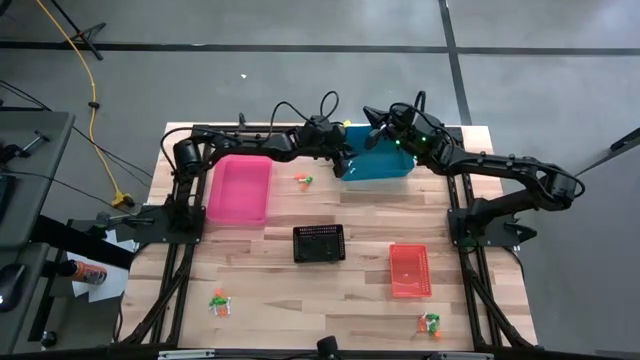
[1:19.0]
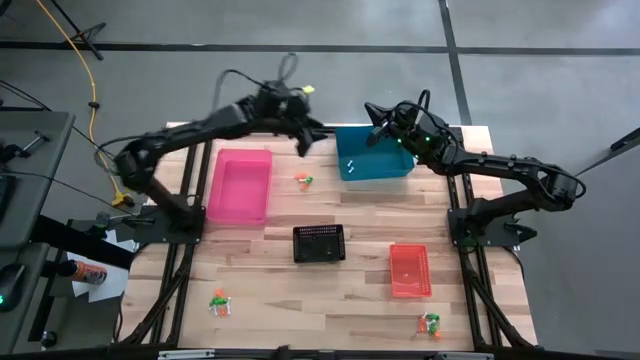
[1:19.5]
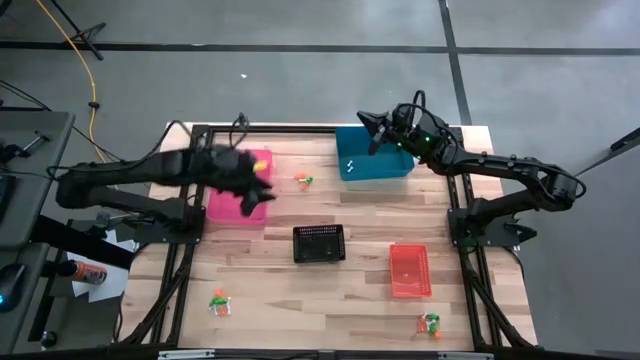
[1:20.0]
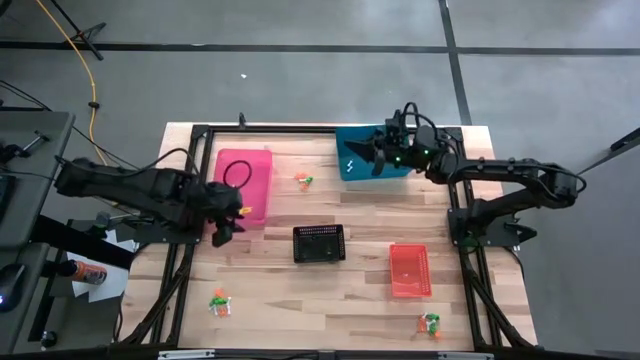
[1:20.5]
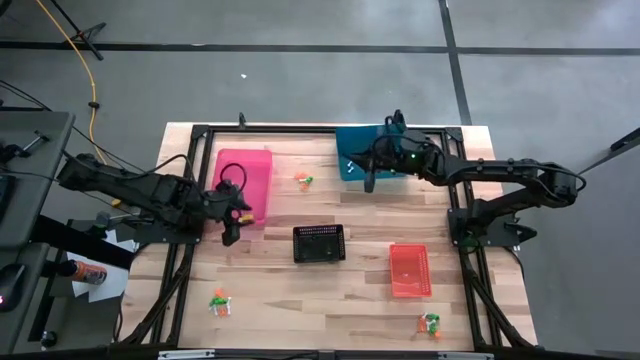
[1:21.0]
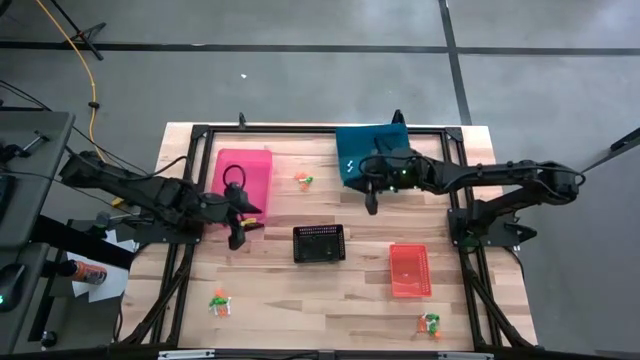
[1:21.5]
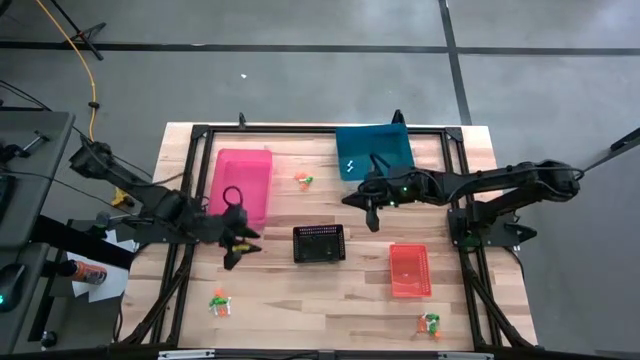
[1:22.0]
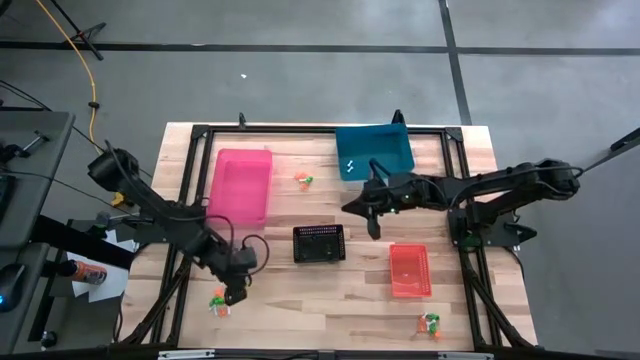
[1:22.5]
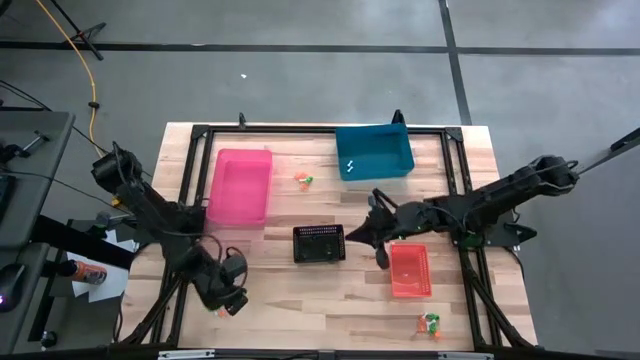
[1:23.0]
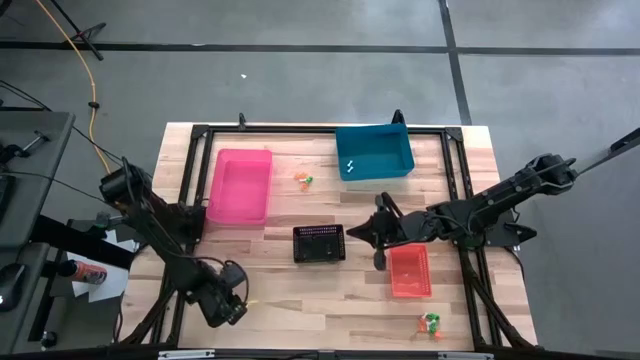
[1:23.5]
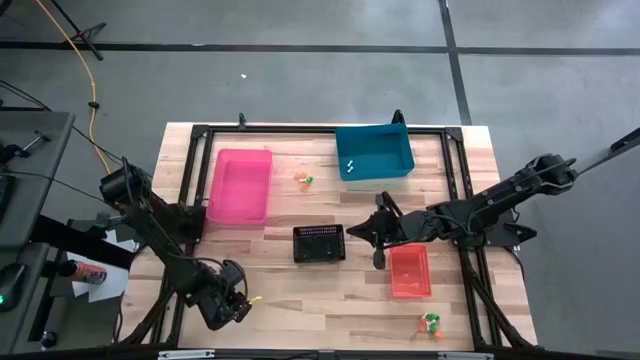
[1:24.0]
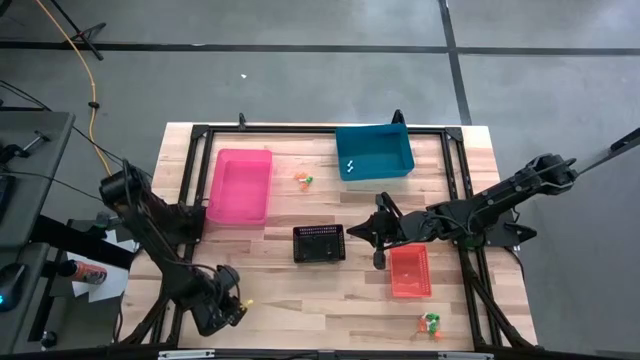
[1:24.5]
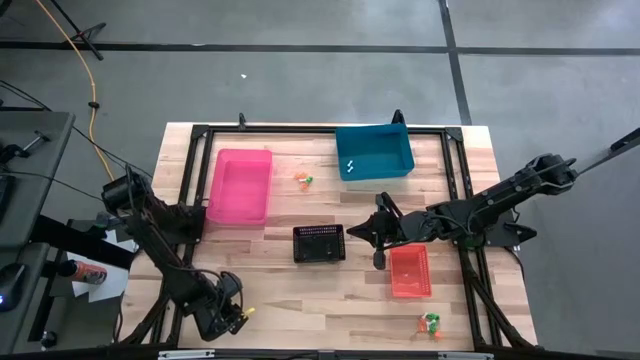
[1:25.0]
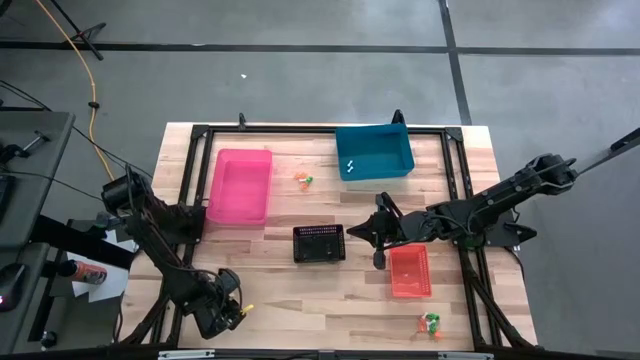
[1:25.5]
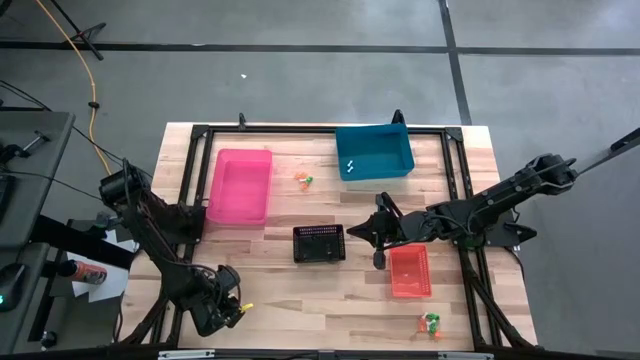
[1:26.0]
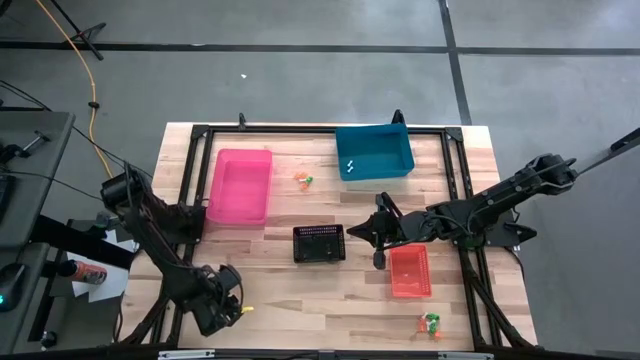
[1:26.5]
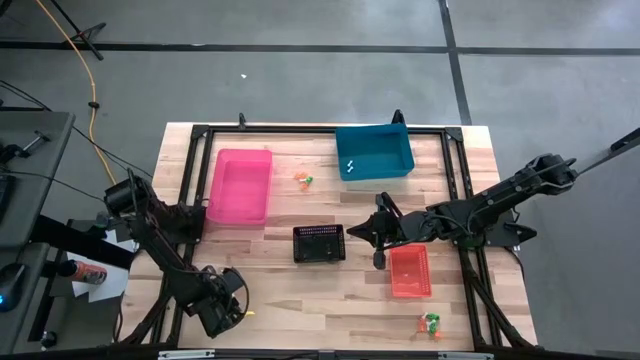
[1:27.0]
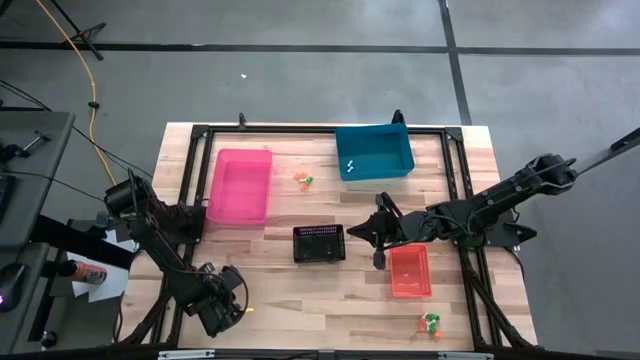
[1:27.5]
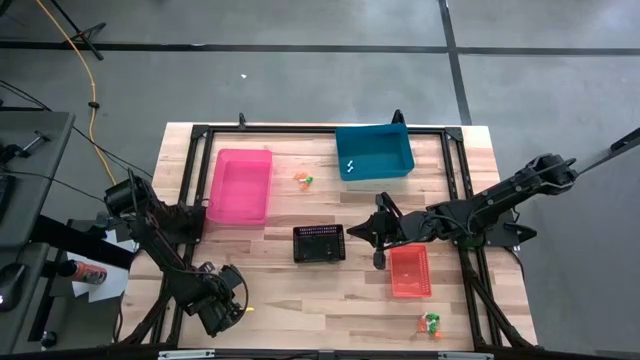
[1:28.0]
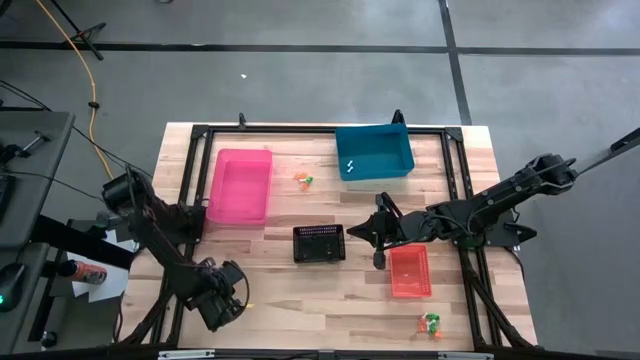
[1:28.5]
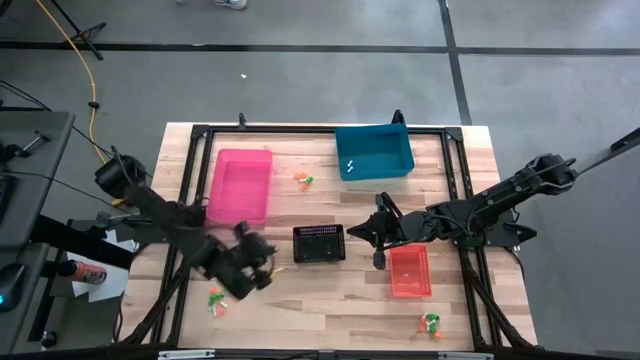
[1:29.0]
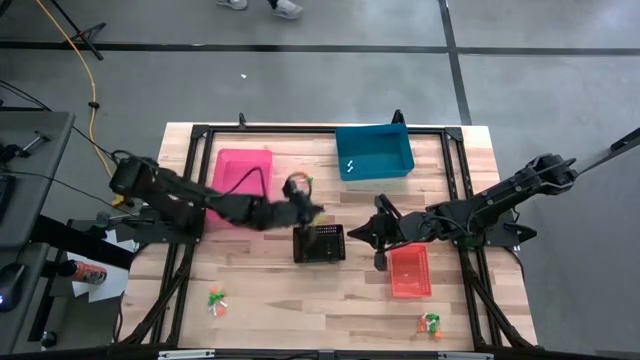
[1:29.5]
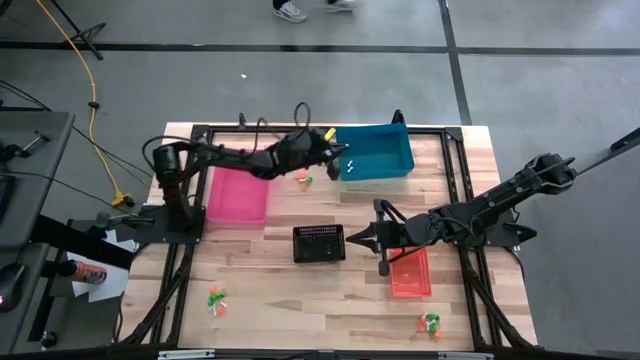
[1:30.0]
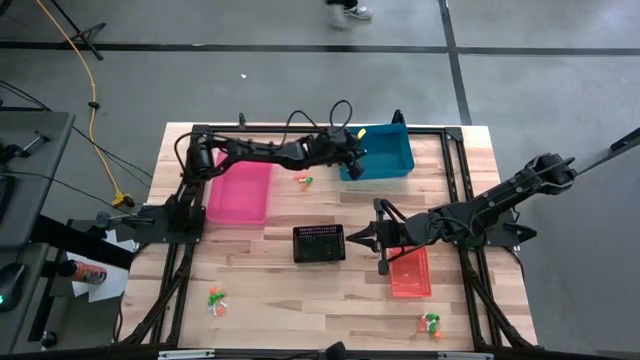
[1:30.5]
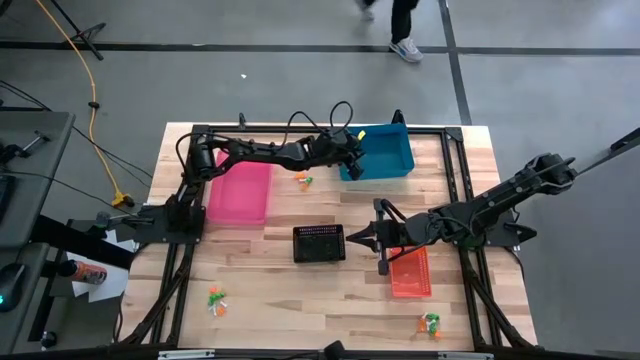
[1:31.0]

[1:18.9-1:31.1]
Task: Sort Halloween decoration
Put the white bone toy into the blue bin

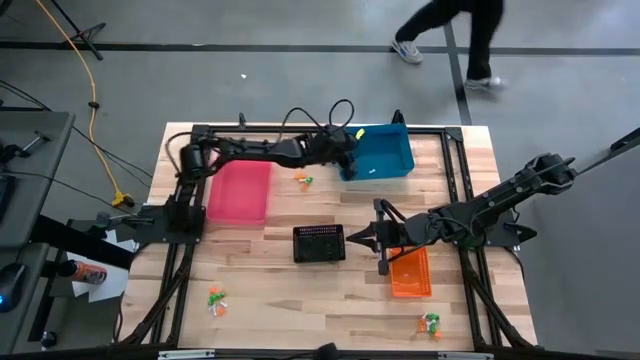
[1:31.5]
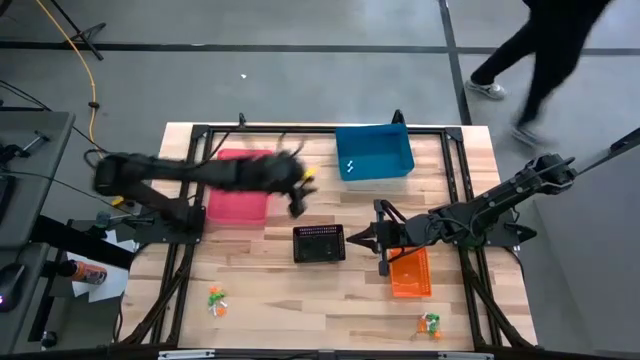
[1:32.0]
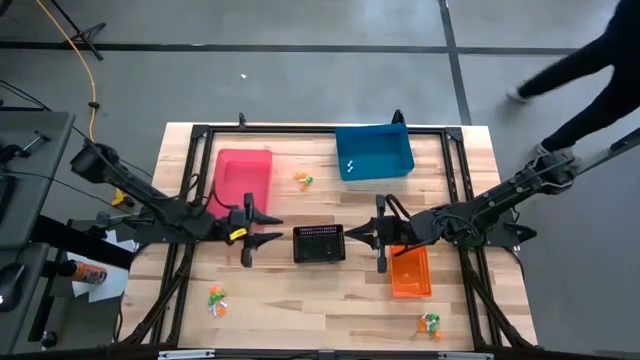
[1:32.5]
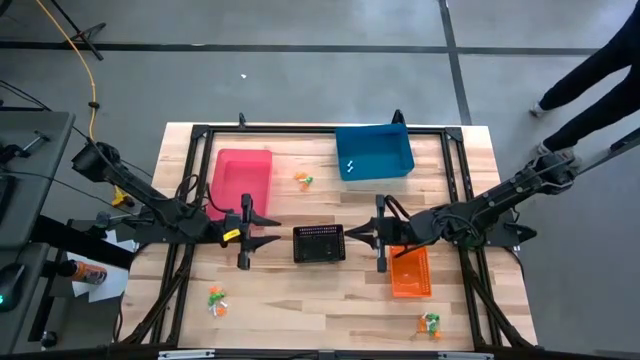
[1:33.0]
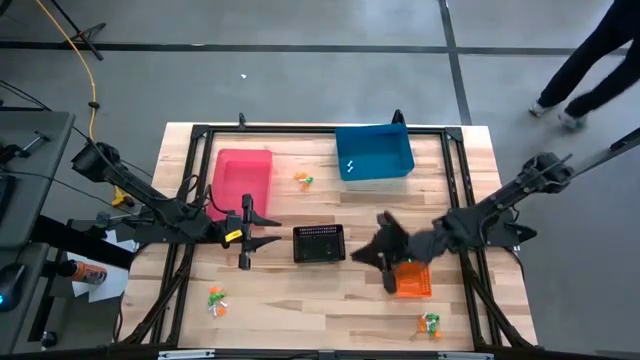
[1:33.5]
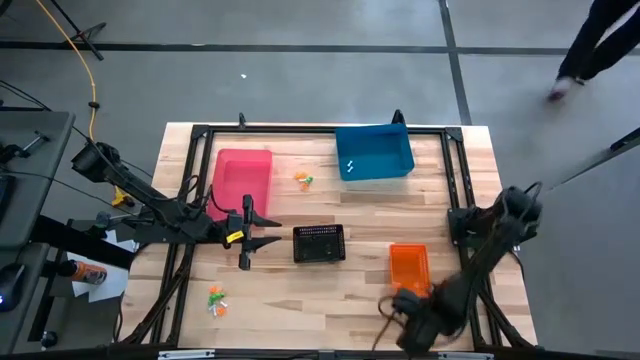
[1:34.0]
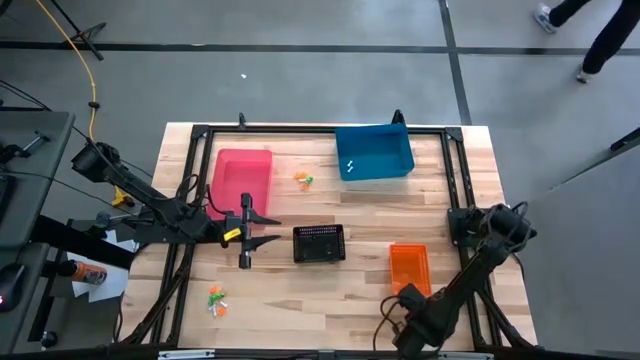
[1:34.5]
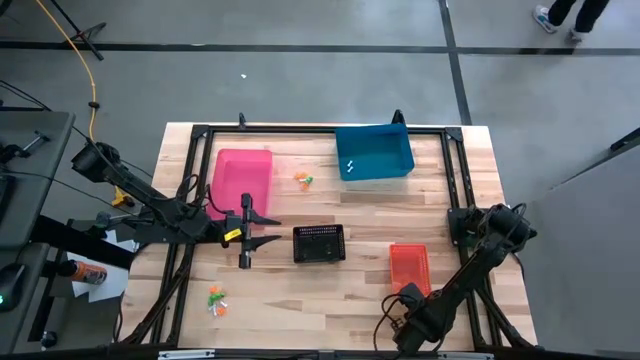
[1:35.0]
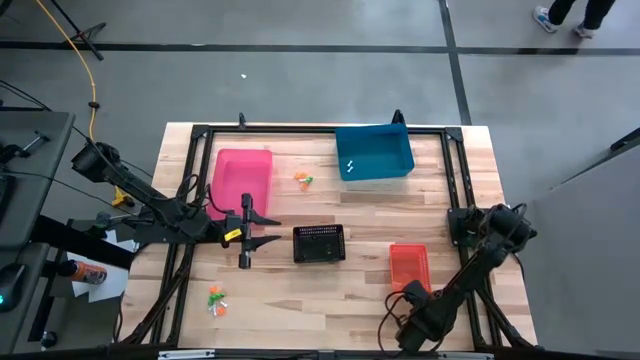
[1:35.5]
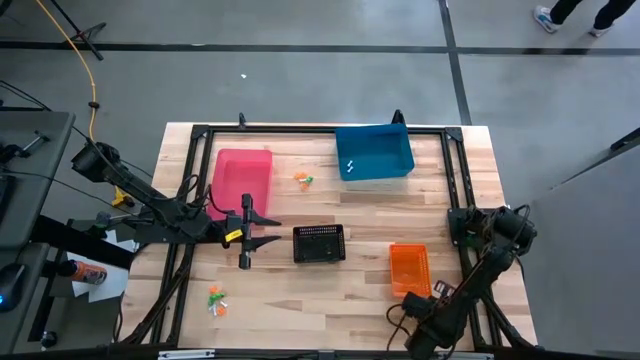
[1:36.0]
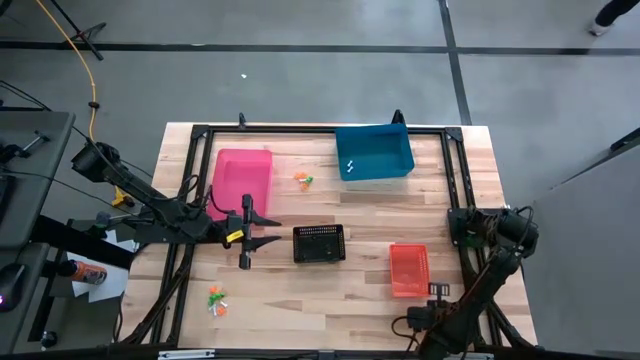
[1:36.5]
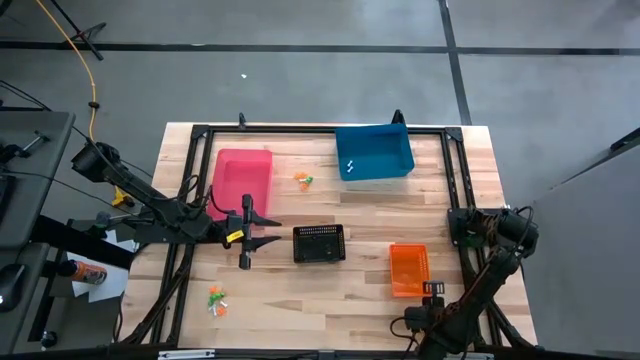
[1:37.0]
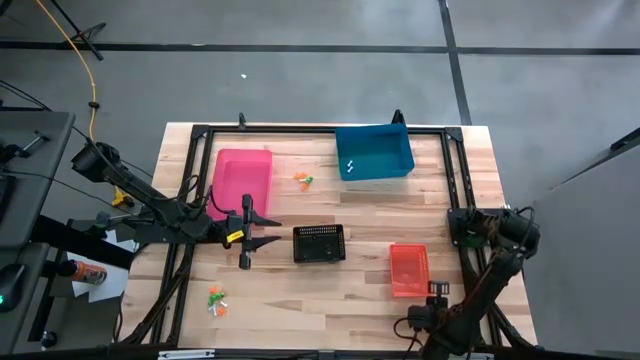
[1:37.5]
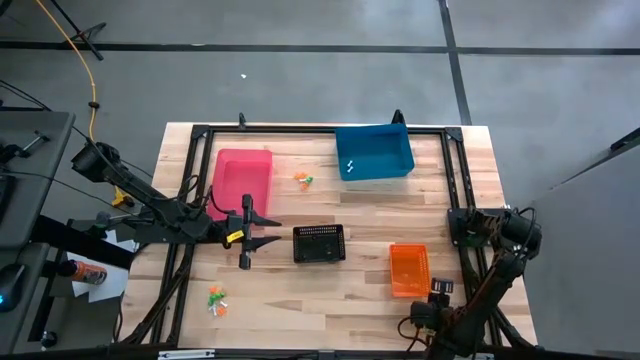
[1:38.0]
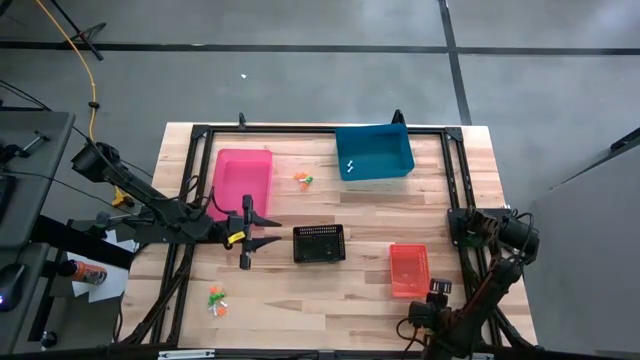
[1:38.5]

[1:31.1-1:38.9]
Put the white bone toy into the blue bin

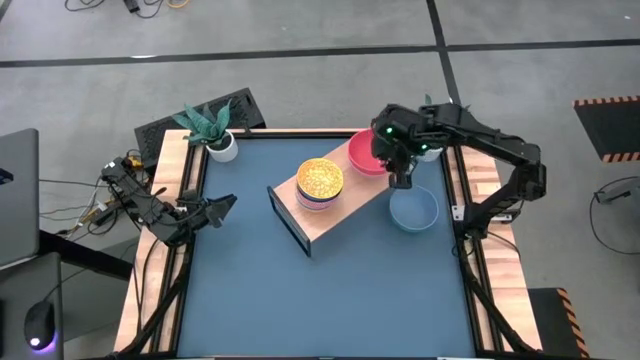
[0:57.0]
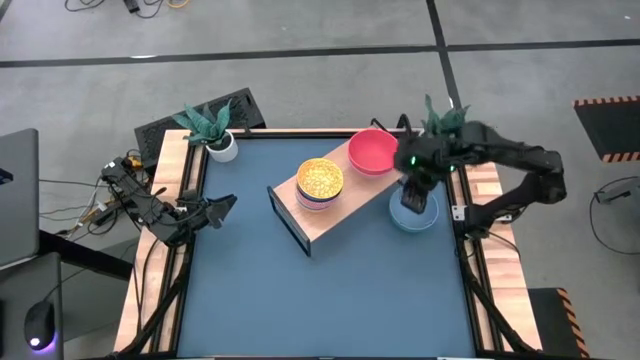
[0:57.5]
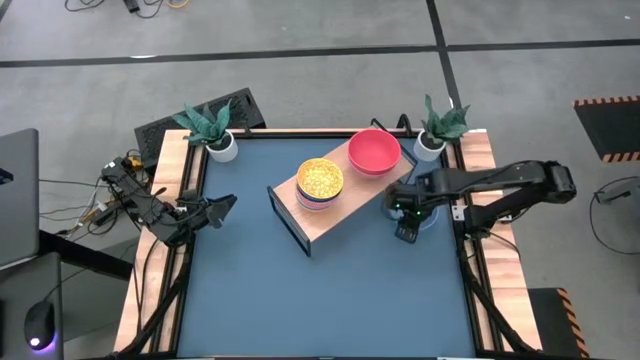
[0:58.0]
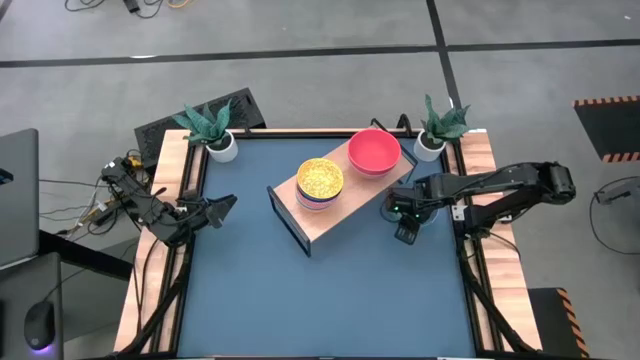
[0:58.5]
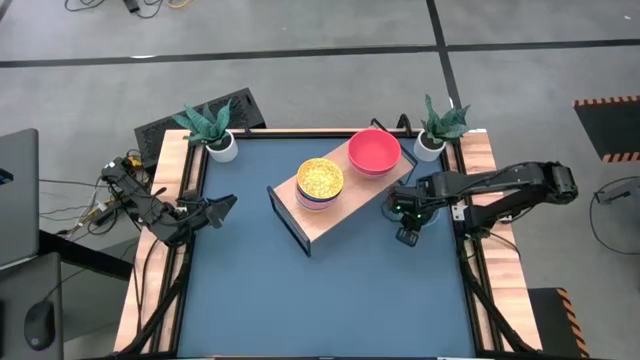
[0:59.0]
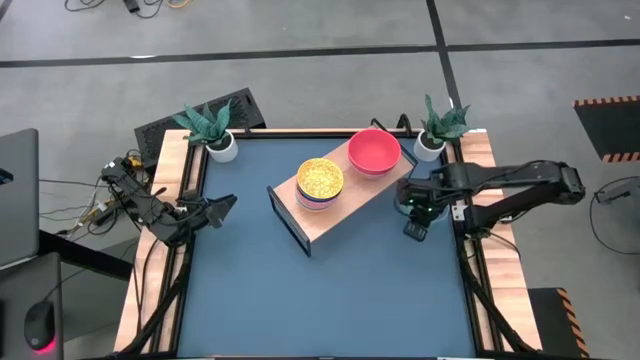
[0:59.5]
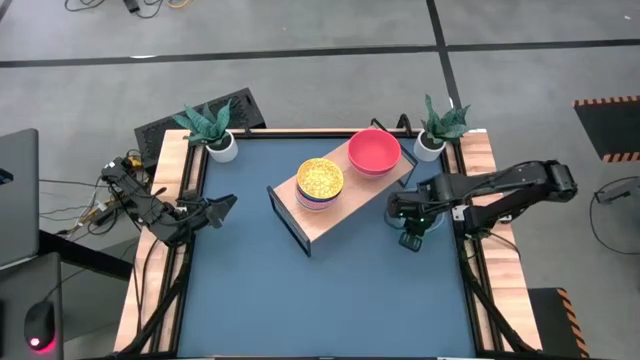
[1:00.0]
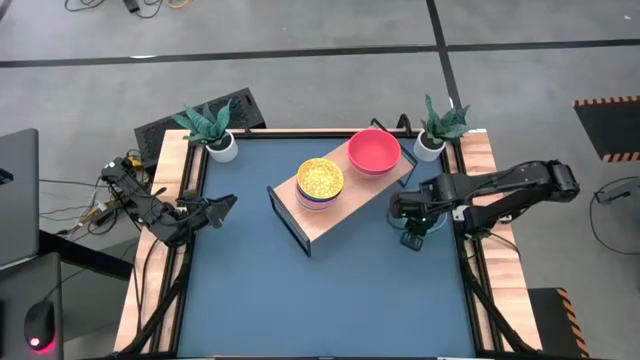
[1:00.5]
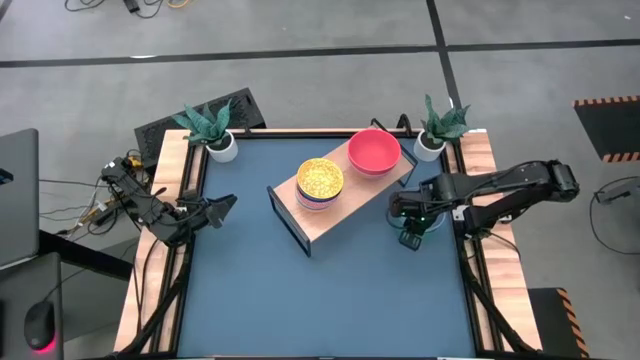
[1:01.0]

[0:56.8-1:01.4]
Task: Place and stack bowls onto a shelf
Stack the blue bowl on top of the red bowl on the shelf
